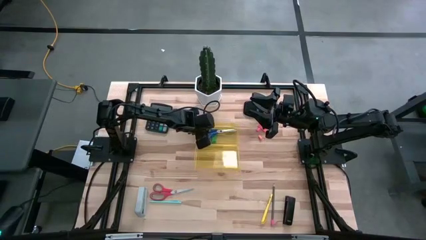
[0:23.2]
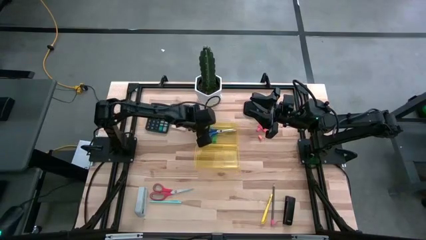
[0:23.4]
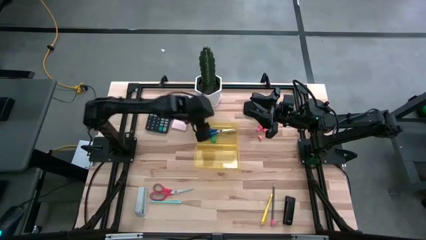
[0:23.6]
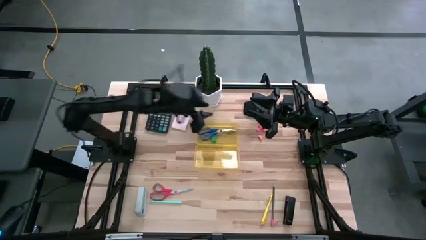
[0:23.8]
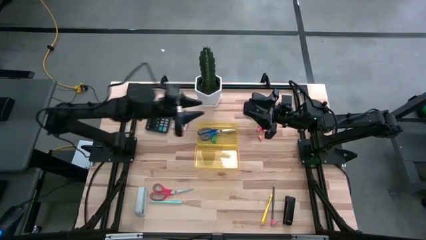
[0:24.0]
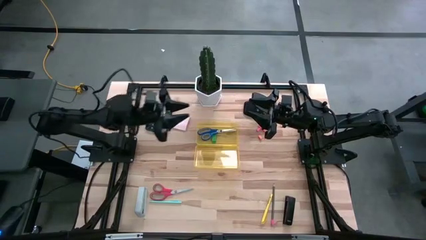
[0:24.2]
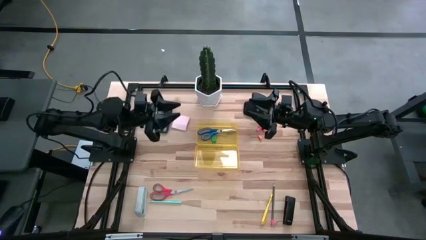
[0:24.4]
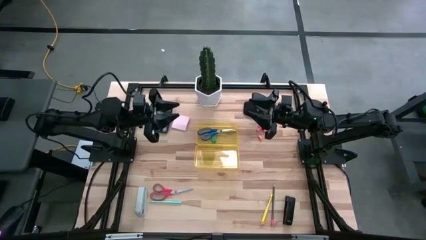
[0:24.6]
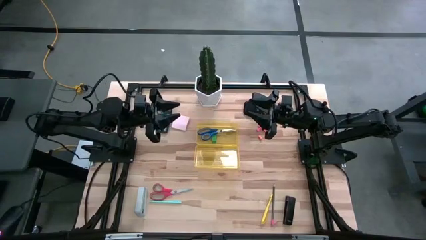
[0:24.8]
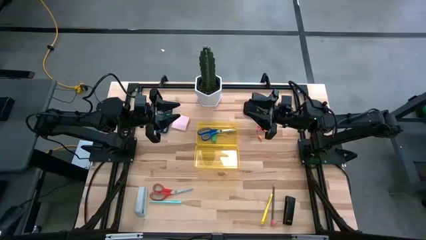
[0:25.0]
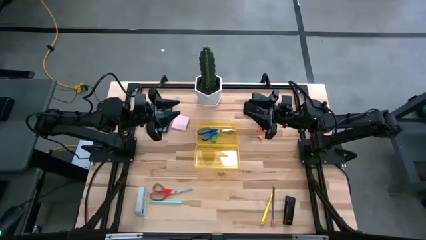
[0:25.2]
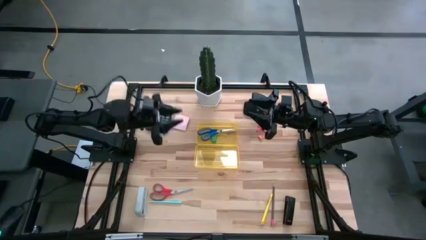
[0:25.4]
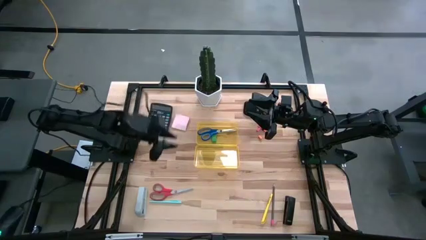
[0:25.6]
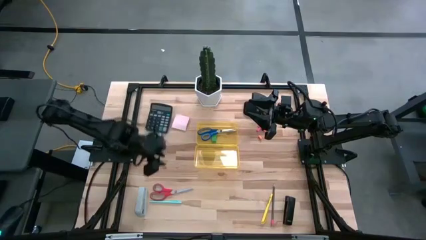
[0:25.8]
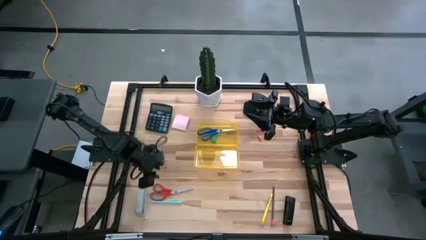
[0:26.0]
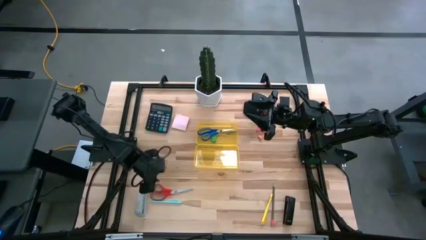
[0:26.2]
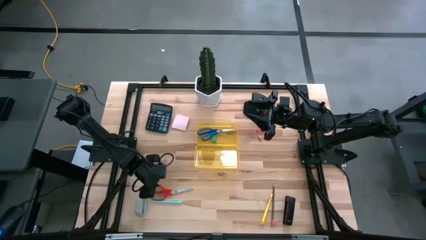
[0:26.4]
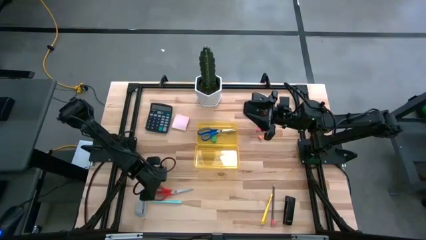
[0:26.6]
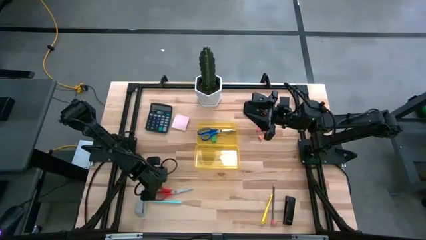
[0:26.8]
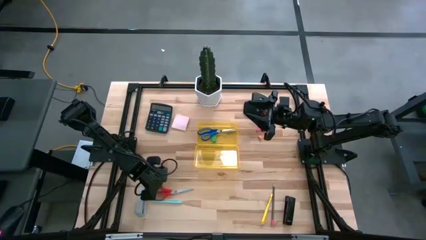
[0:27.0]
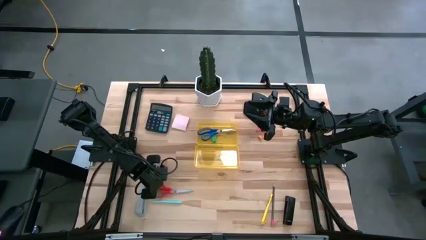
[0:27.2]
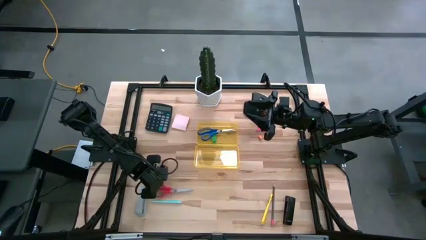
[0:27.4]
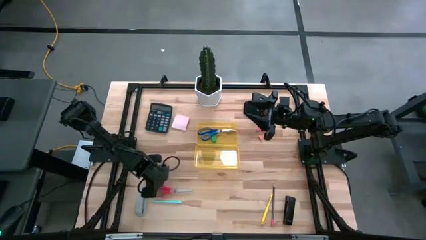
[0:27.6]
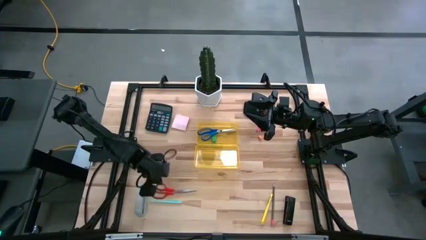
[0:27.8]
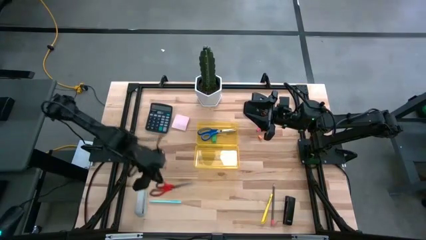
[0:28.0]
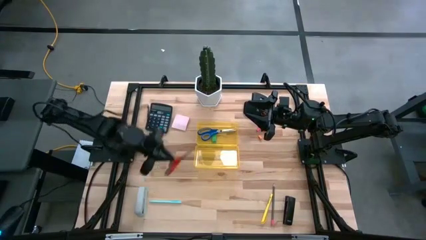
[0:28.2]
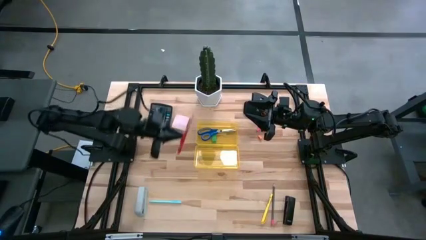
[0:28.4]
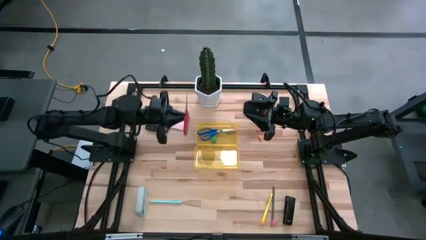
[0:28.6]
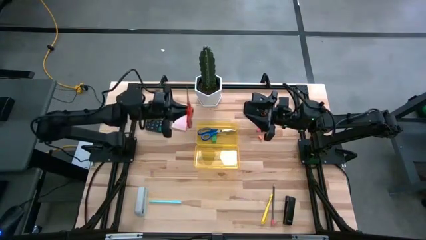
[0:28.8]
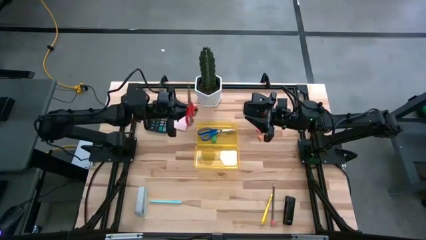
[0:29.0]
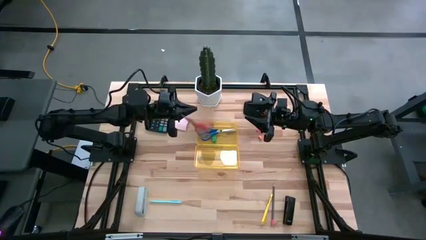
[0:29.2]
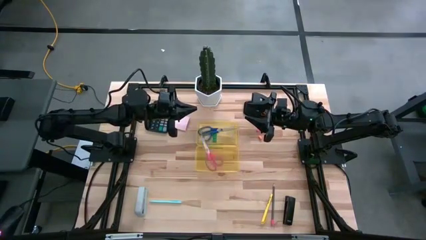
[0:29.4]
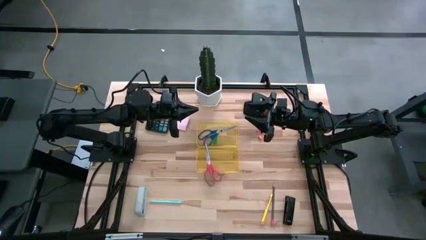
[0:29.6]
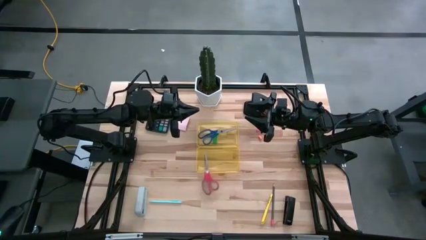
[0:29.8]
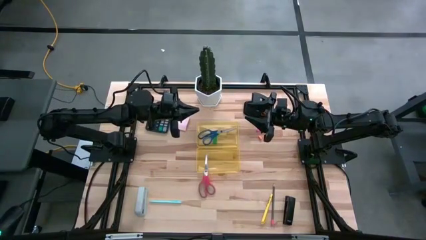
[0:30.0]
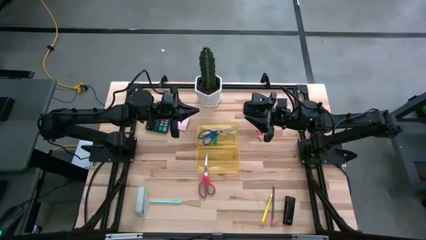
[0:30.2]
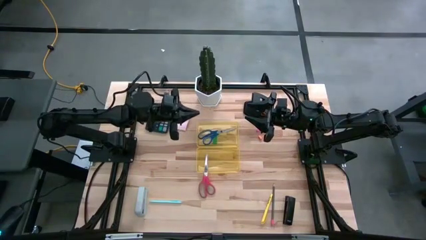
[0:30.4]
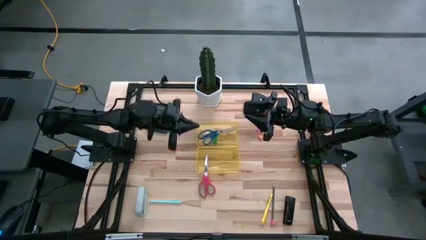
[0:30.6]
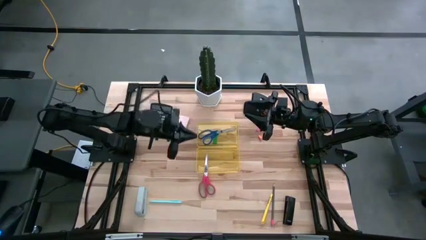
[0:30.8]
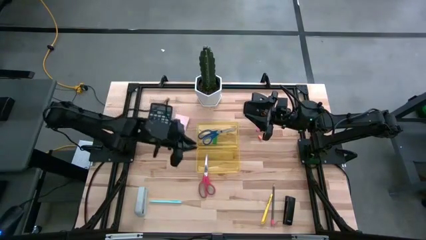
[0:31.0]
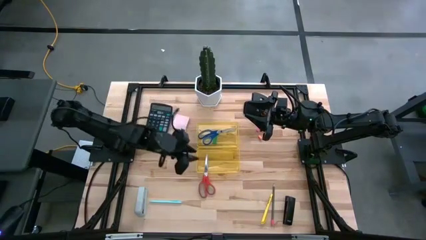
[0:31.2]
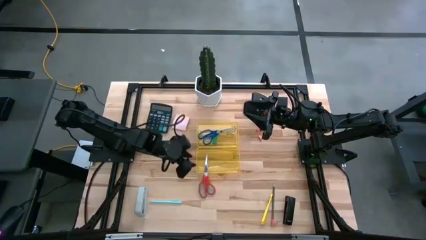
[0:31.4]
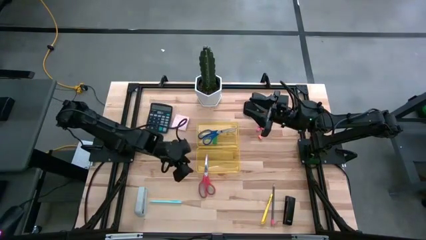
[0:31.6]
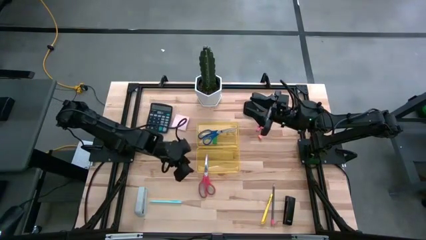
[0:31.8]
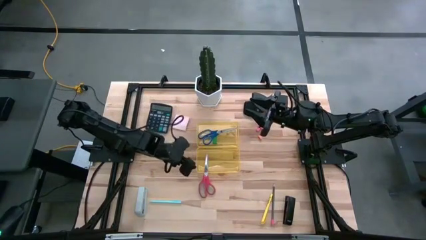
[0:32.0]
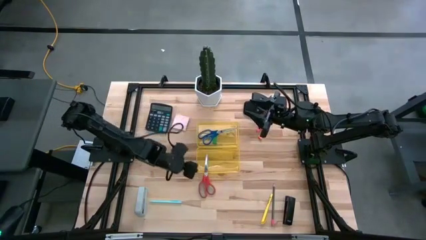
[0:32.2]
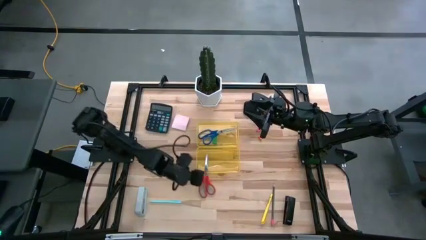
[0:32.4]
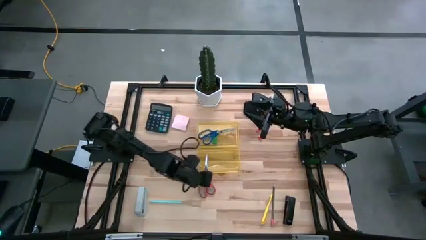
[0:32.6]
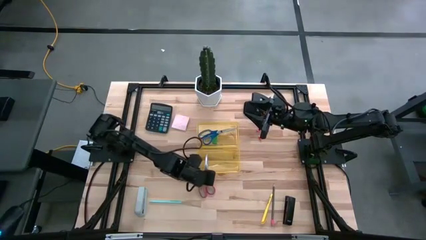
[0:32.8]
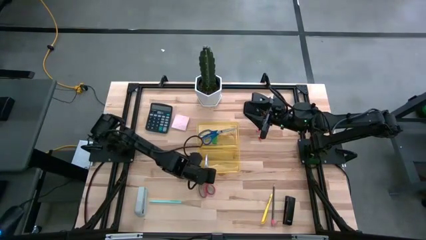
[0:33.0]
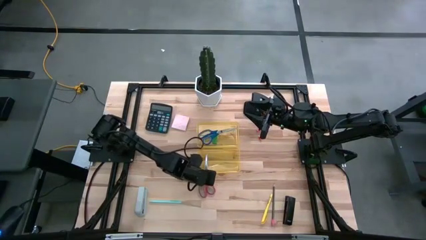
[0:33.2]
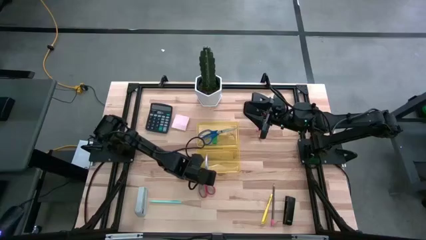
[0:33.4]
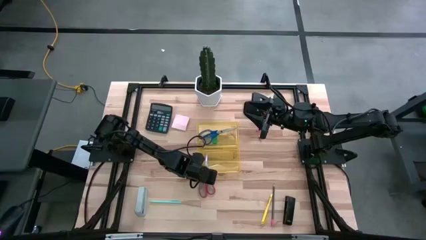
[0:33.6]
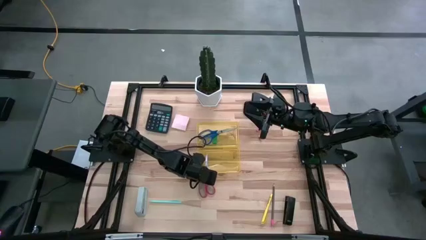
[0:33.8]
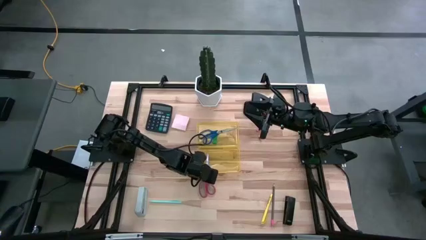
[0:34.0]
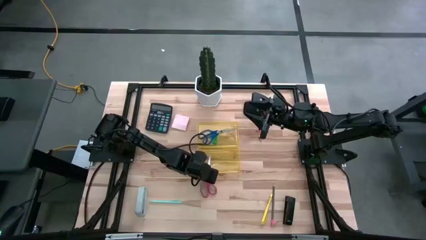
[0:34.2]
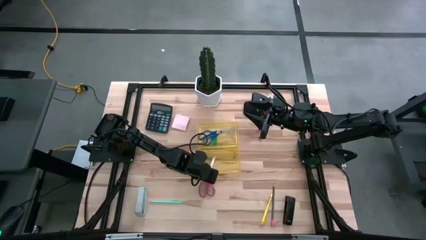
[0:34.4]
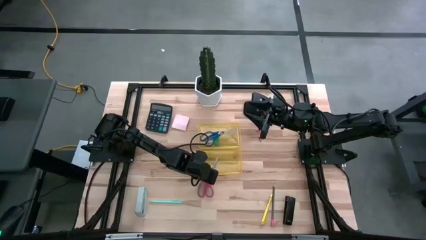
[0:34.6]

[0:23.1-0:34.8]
Task: Pack school essentials
Put the pink scissors into the yellow supply box

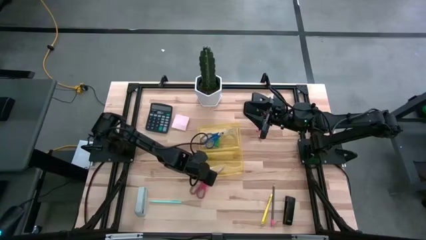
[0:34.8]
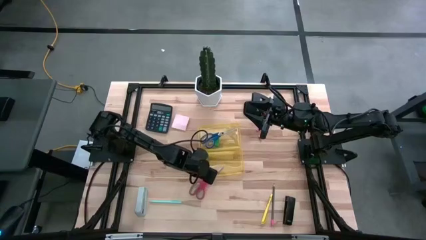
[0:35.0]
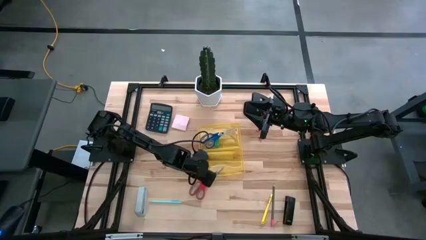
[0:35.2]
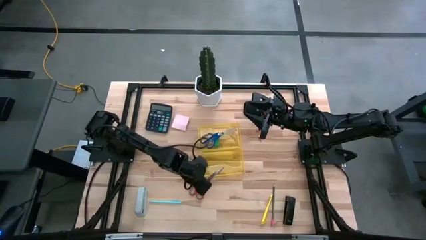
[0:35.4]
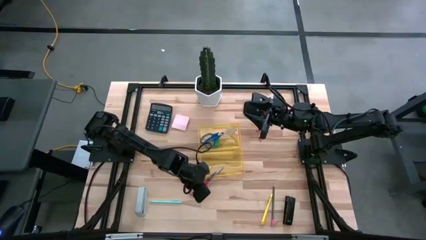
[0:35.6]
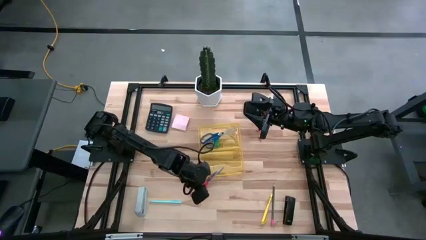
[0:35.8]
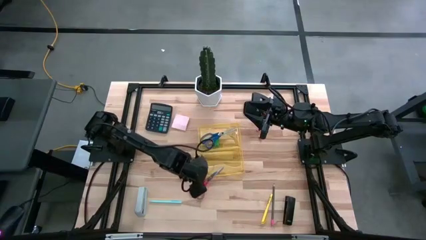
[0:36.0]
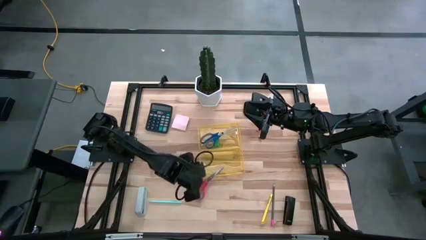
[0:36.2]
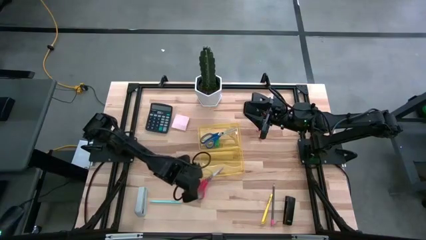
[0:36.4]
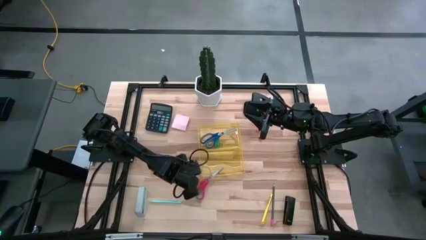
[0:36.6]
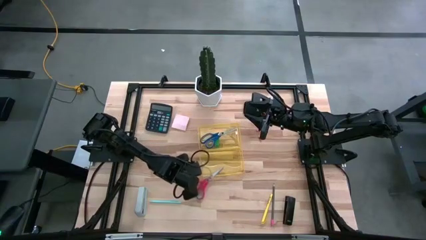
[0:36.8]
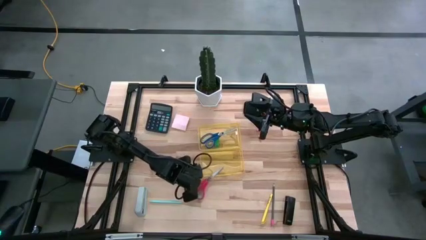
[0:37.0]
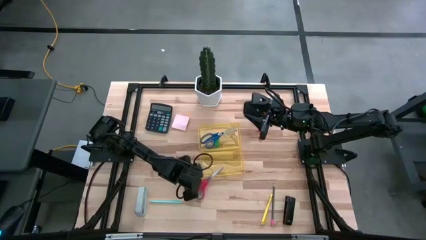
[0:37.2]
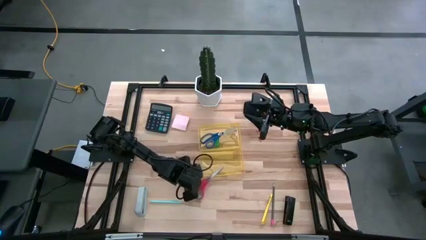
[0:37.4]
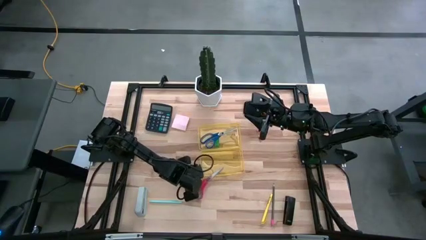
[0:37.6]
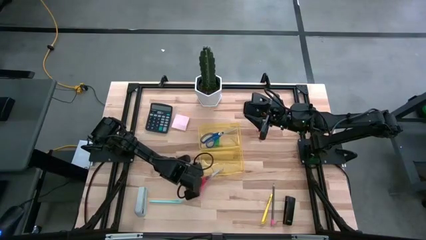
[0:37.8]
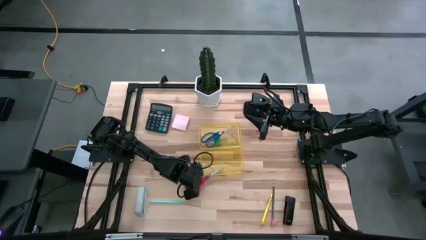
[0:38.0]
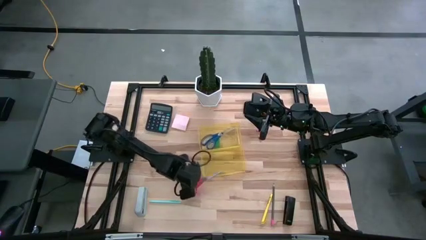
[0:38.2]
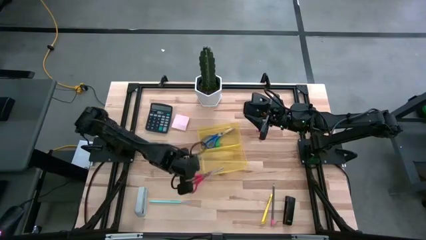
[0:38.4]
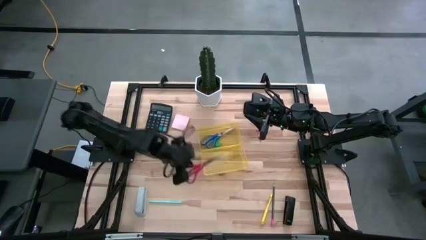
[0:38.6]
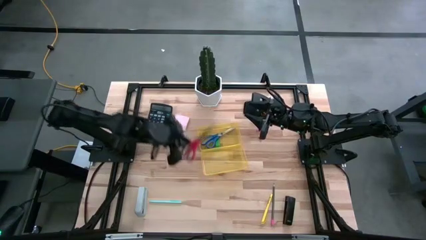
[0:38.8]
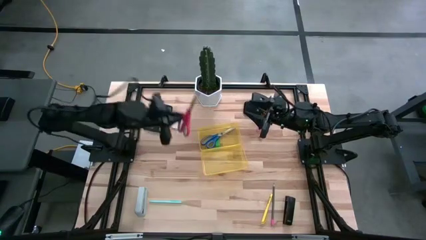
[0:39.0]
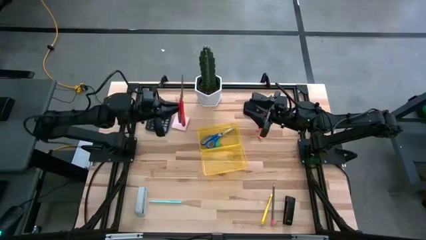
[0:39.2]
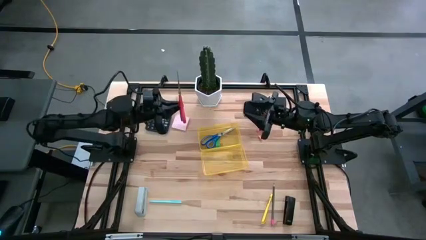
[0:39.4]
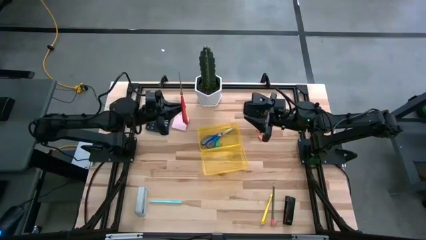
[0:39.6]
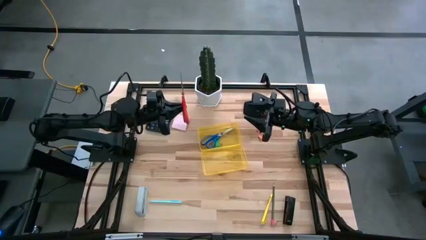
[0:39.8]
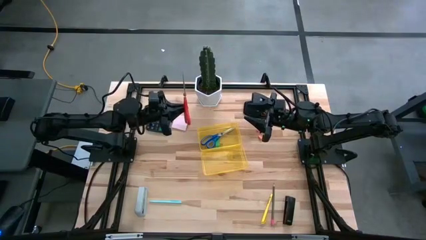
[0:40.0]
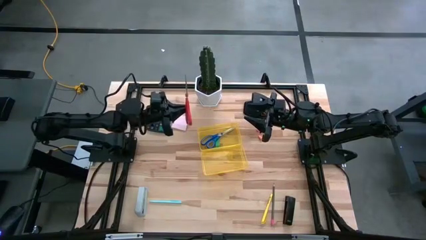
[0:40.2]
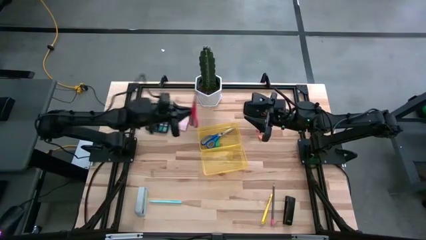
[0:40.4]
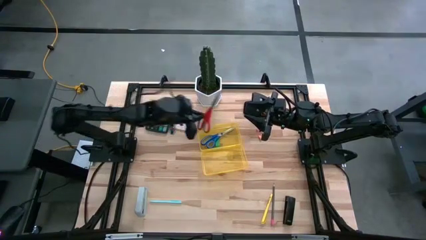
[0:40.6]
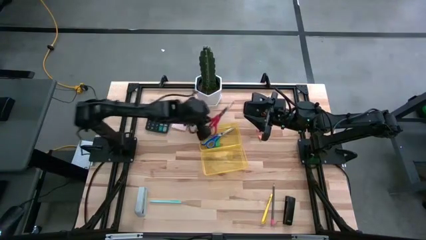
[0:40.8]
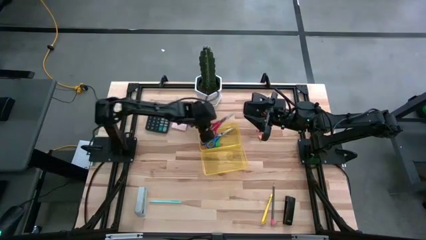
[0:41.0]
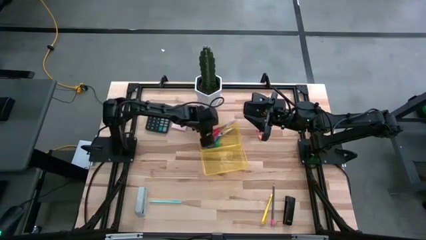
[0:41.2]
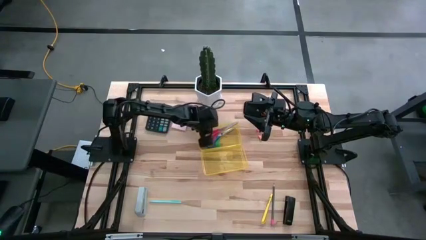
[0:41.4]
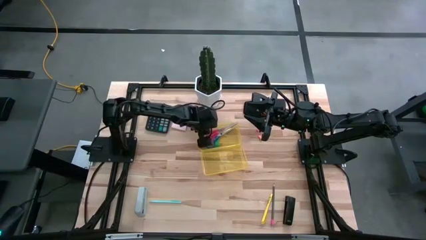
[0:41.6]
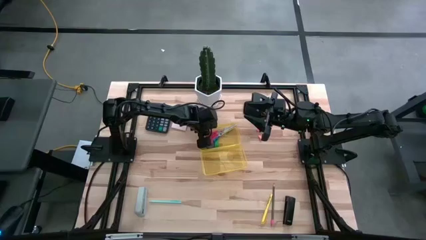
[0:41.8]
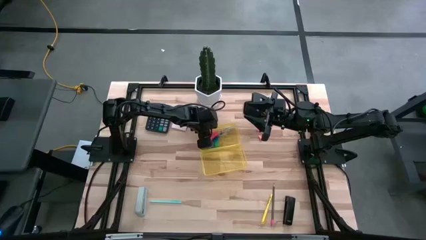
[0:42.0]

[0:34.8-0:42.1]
Put the pink scissors into the yellow supply box
